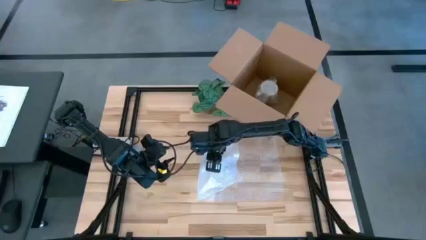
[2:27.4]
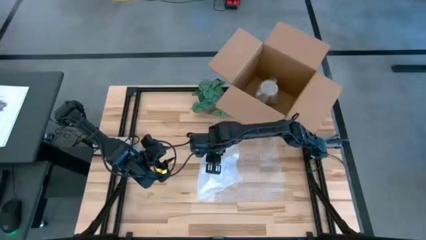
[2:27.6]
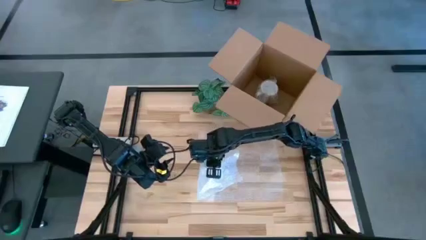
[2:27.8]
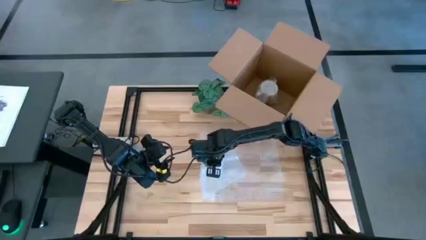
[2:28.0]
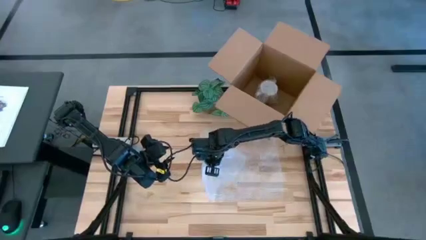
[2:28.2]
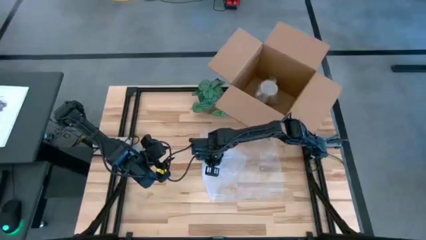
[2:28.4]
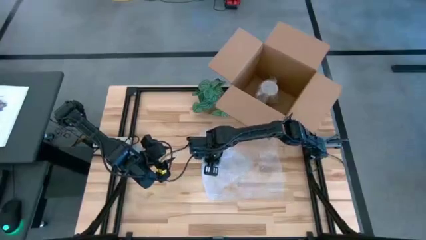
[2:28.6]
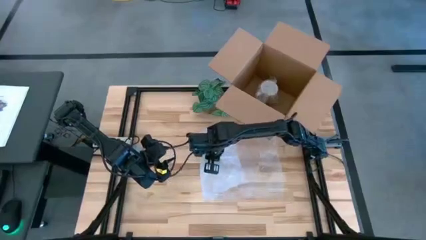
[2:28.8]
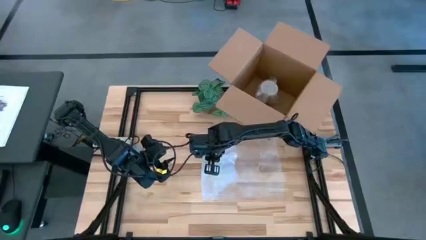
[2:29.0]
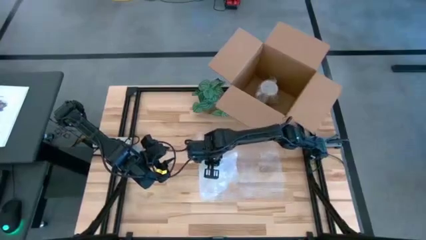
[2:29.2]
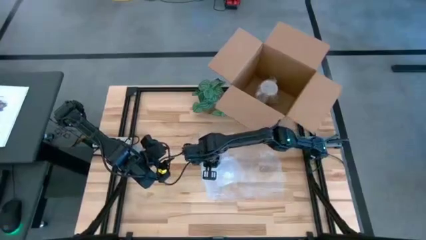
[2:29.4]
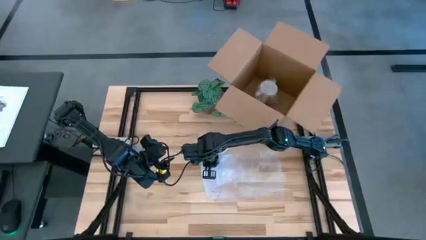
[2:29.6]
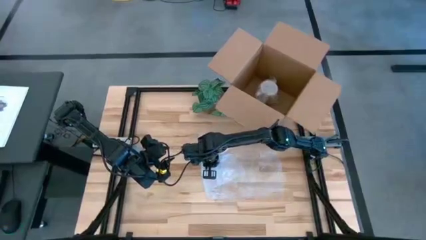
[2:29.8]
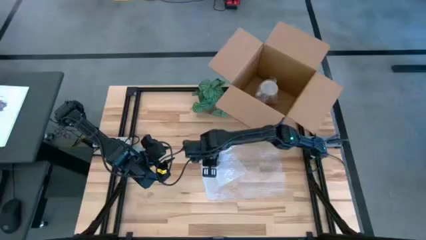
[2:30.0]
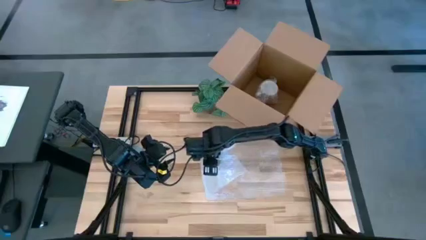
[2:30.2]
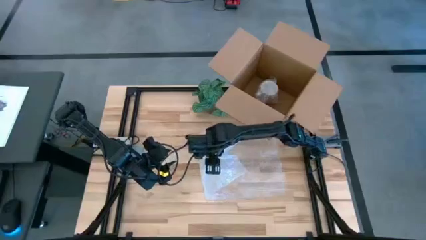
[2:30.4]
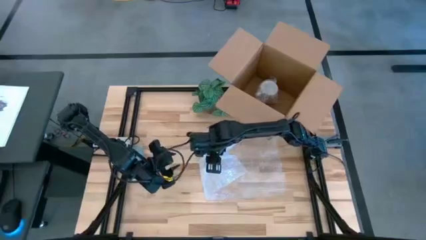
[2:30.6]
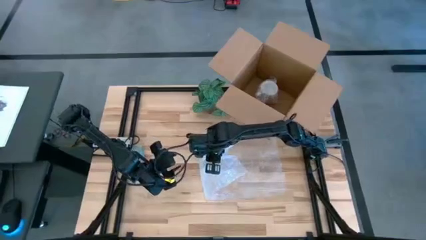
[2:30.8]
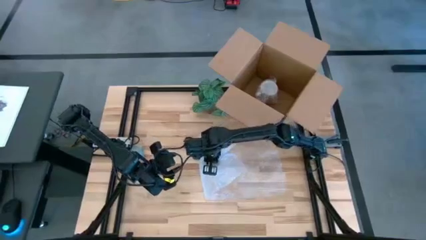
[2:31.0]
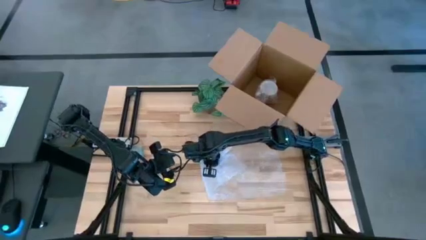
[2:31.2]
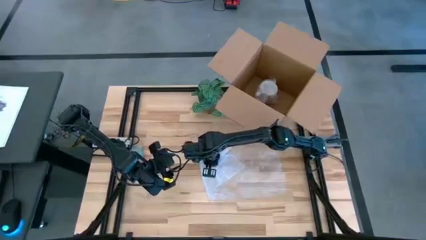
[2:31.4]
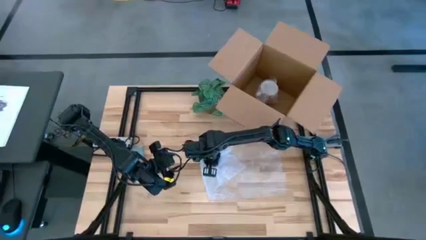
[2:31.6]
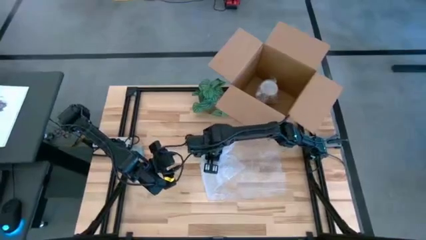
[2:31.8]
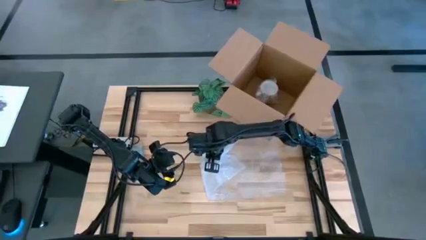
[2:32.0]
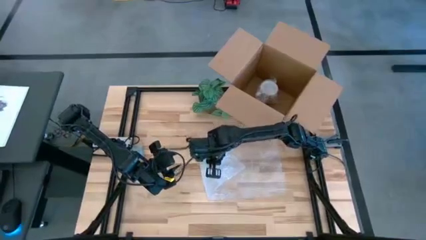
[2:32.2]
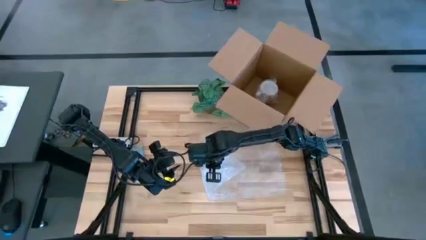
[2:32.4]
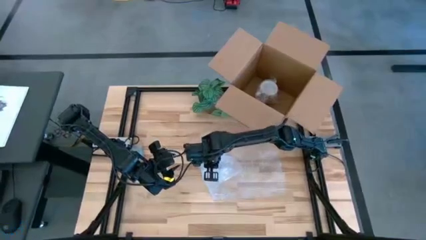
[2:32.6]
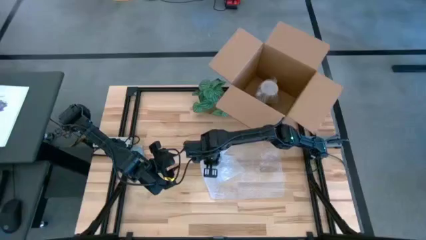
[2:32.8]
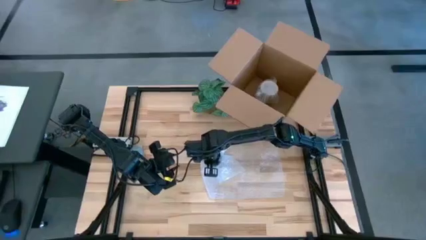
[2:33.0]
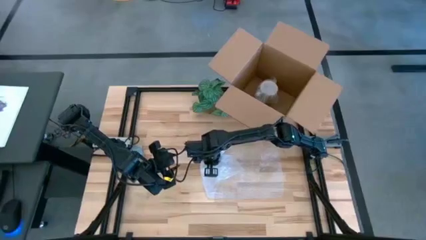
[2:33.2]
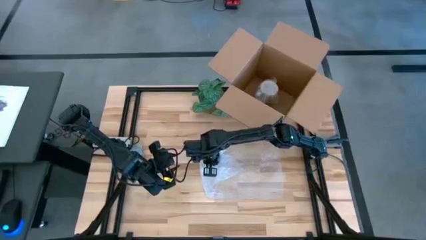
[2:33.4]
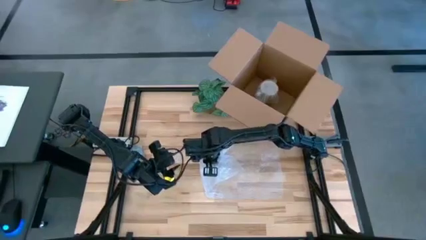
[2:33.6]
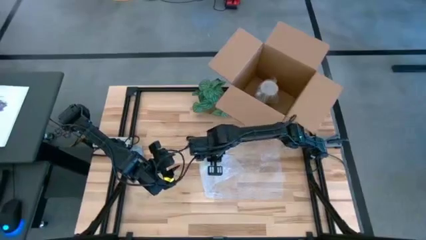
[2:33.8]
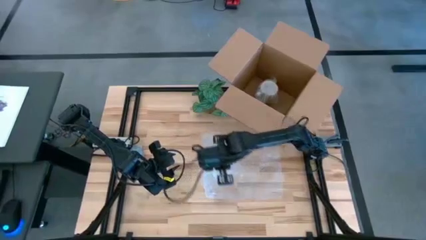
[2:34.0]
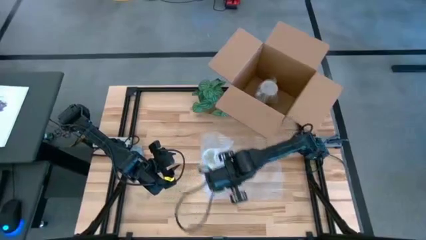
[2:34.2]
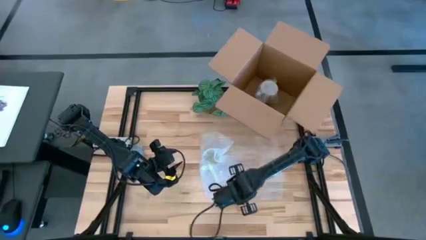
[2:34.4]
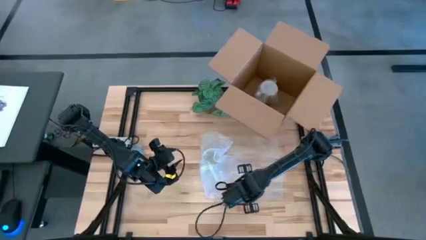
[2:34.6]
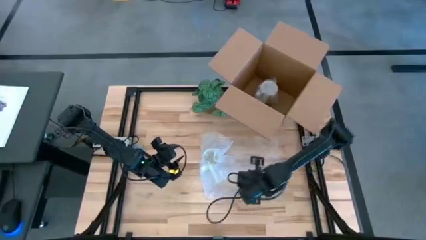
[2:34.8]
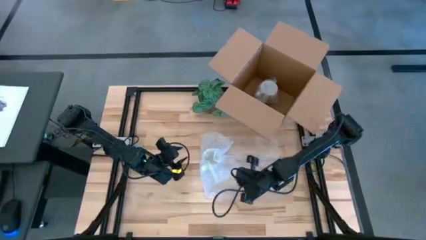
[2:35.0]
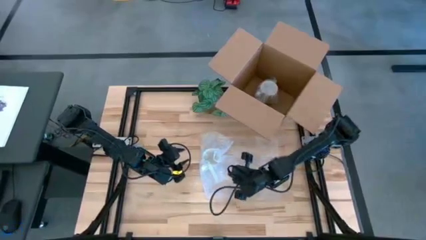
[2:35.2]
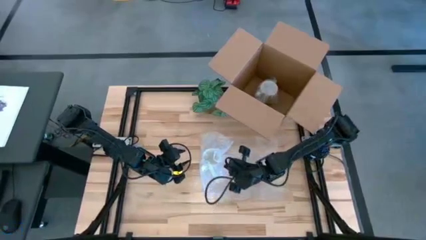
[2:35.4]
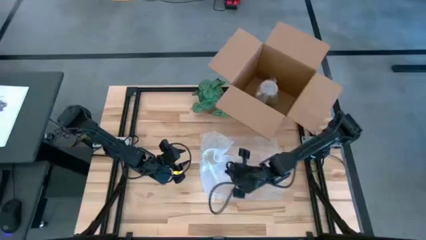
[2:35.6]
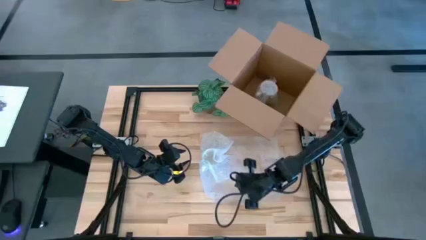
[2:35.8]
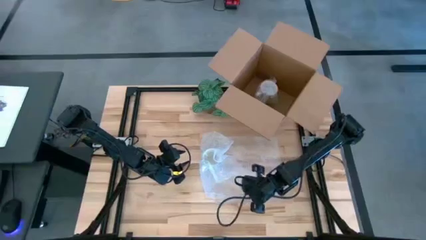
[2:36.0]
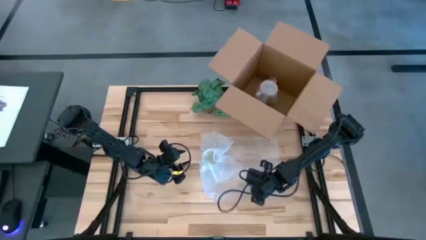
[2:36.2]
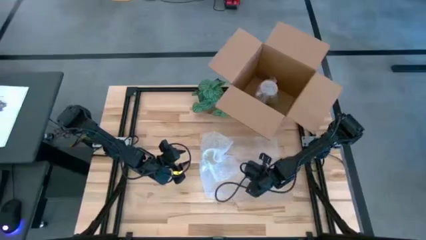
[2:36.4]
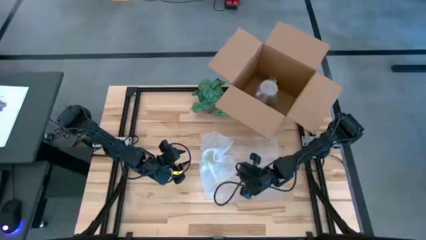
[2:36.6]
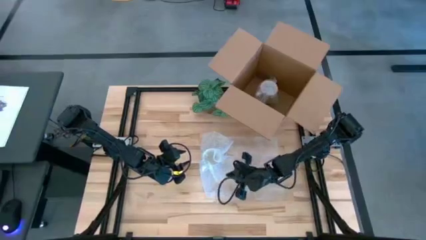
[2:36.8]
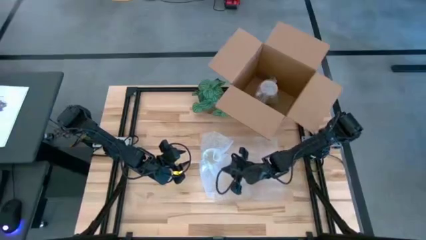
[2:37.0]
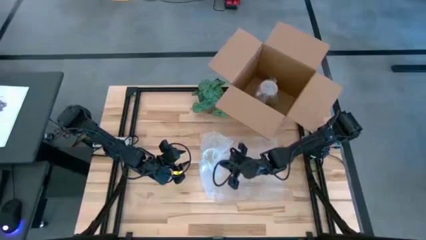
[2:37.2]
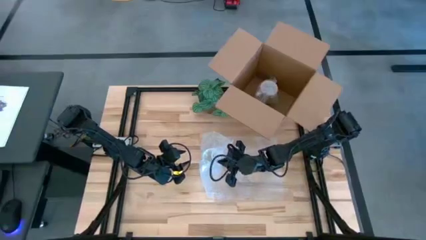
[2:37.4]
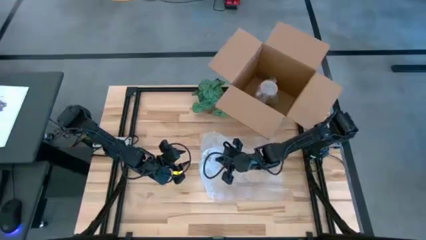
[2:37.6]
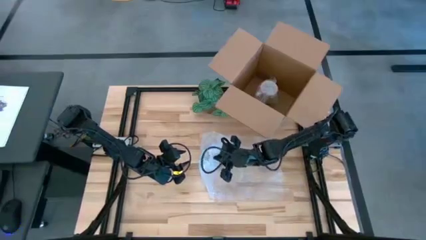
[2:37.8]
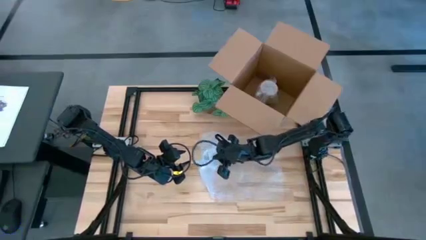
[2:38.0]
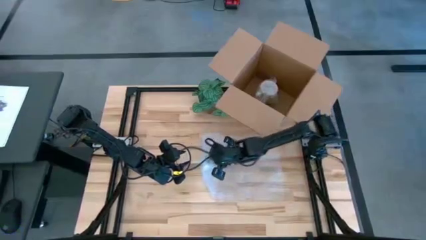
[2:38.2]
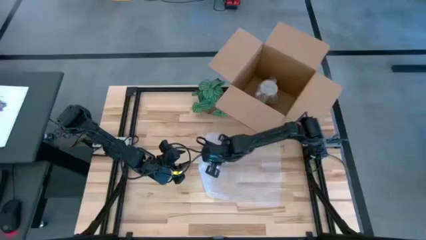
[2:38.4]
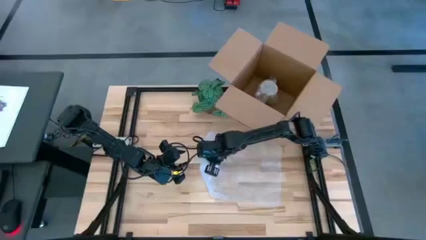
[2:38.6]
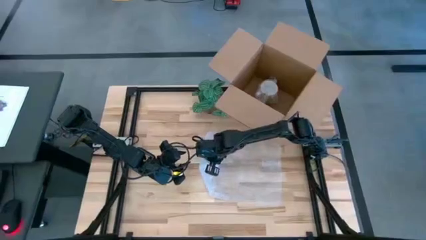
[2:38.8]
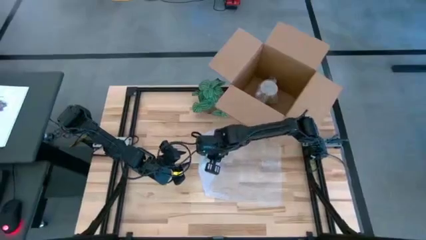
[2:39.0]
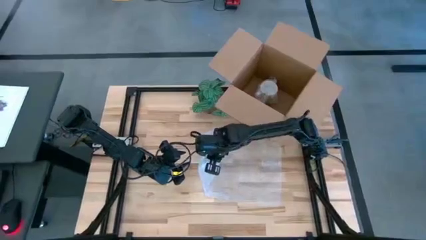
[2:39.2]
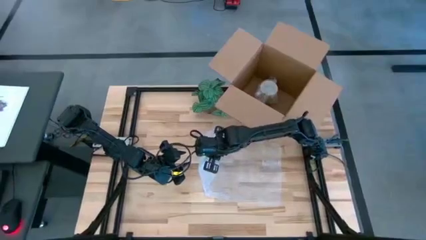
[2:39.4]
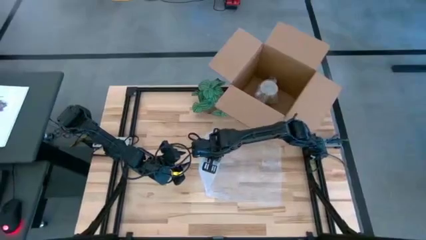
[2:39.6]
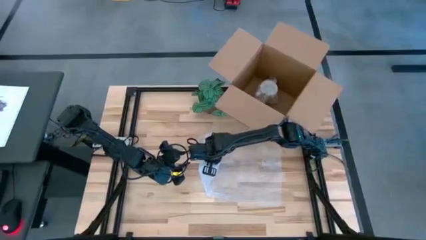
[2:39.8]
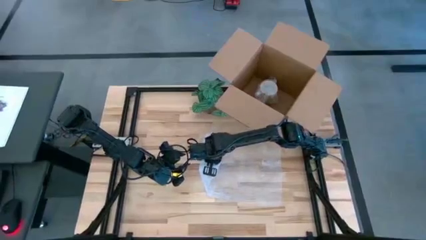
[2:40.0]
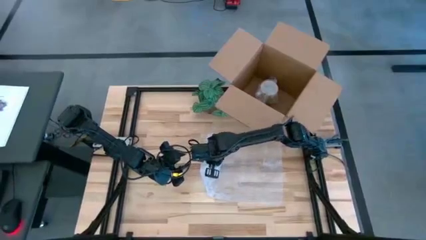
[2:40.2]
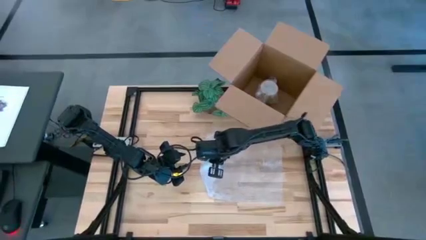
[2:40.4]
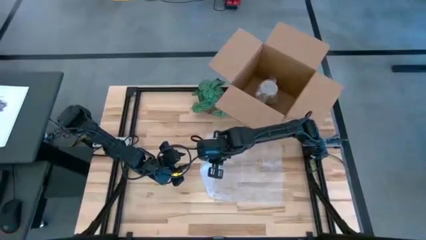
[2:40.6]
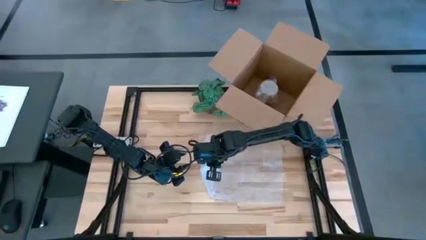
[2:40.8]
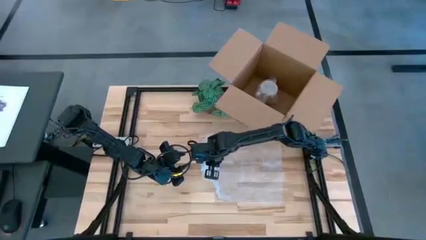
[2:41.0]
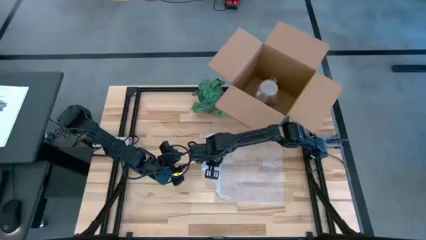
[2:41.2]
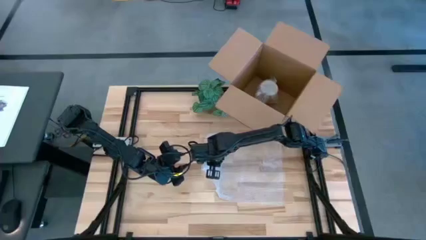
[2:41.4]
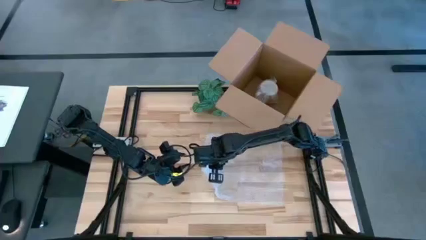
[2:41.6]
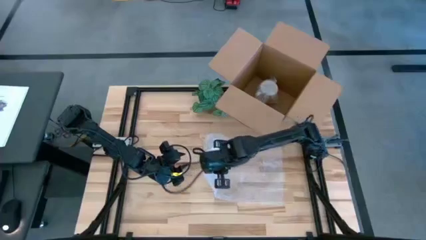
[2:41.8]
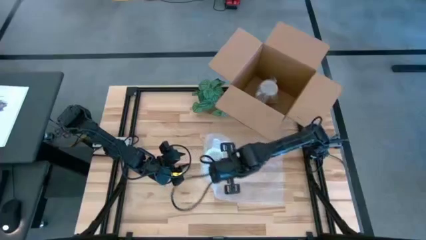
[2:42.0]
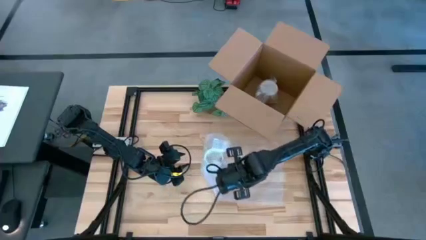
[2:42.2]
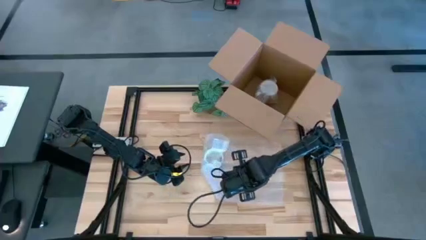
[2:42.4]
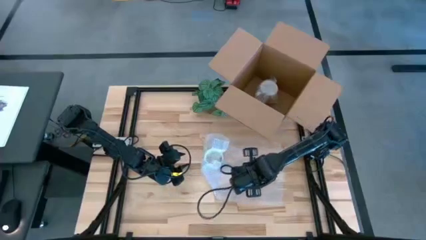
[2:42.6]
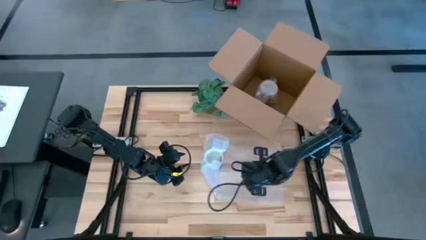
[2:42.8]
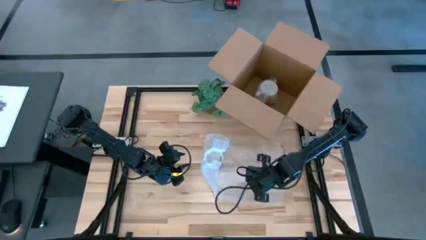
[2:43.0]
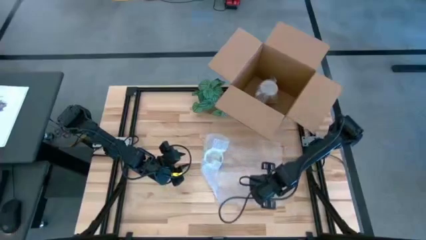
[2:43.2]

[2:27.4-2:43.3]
Task: wrap mug
Wrap the blue mug

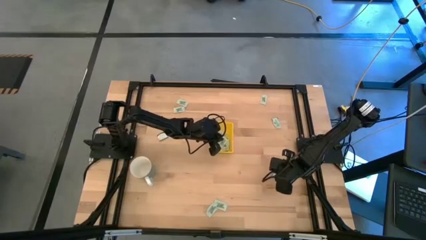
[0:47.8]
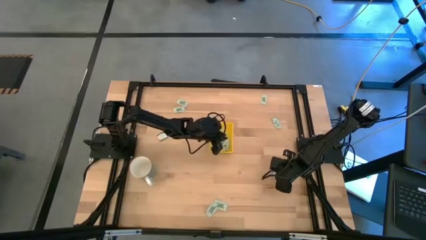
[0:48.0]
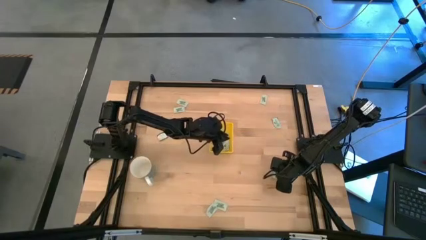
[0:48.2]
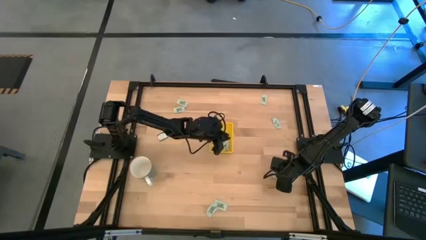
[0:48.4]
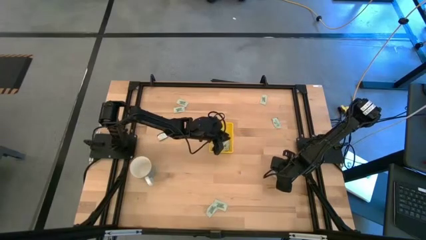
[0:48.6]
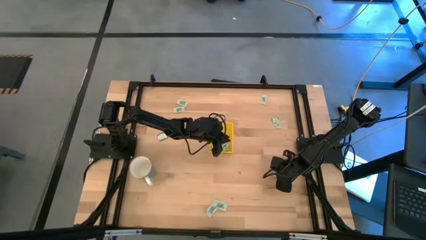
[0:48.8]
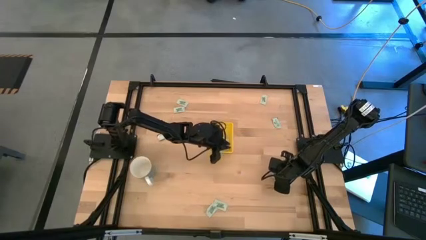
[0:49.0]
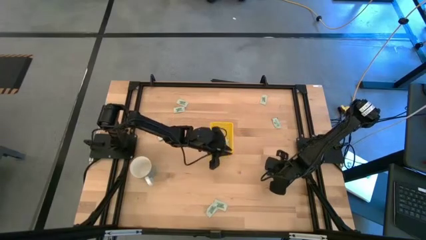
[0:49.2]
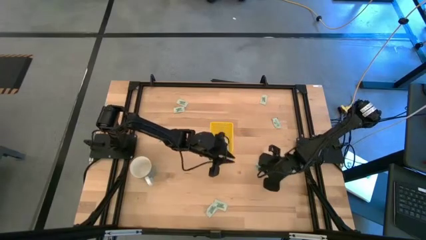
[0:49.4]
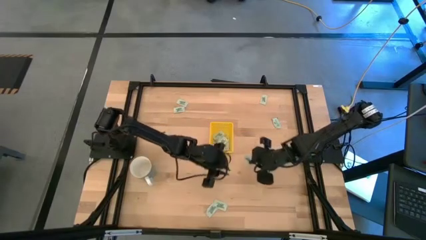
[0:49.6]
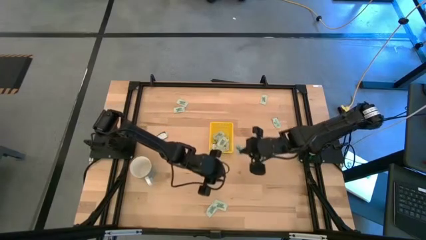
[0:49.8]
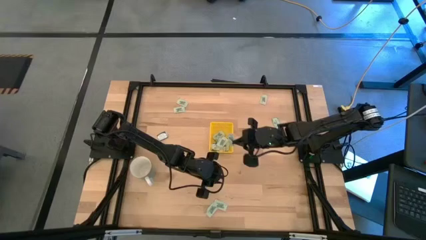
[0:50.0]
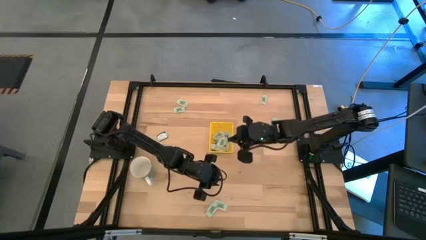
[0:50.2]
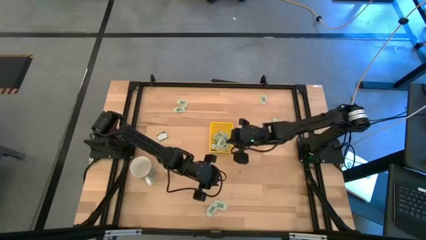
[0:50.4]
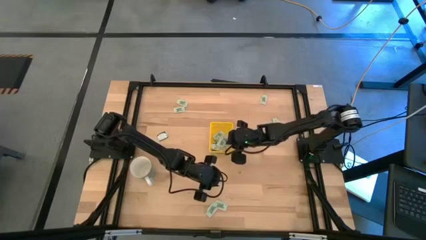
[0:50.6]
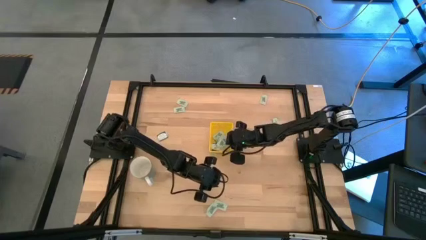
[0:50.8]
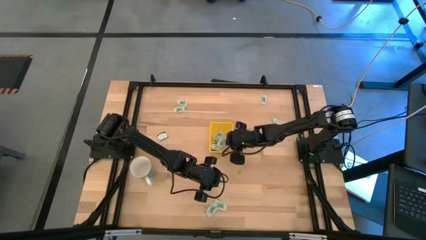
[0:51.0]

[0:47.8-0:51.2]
Task: Pick and place Stevia / Truvia into bins
Put the white stevia packet into the yellow bin
